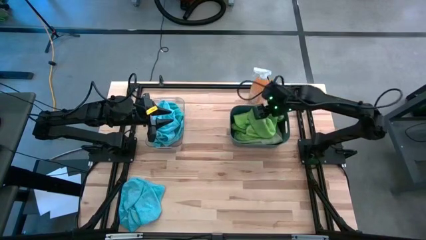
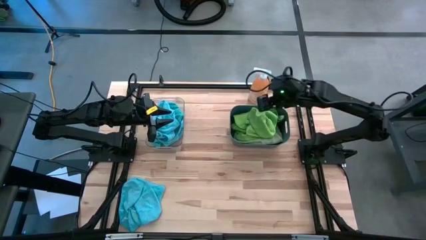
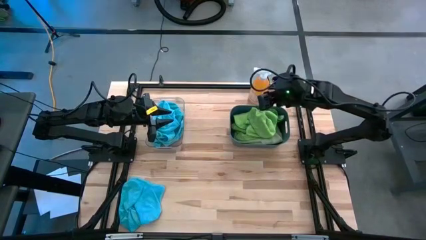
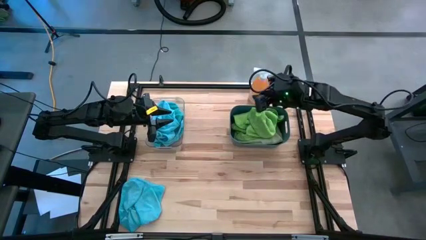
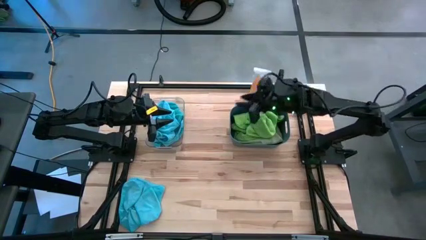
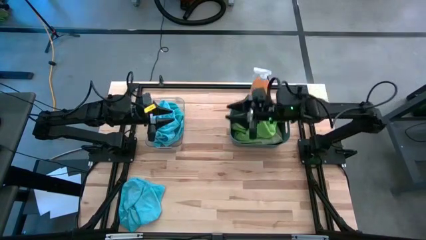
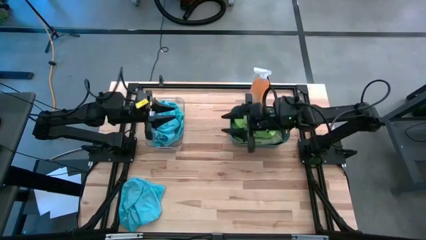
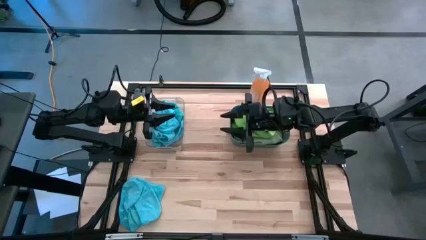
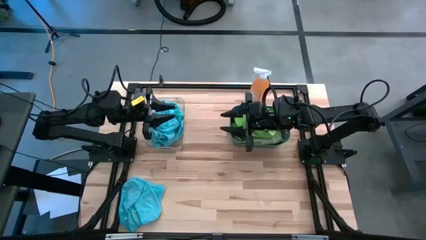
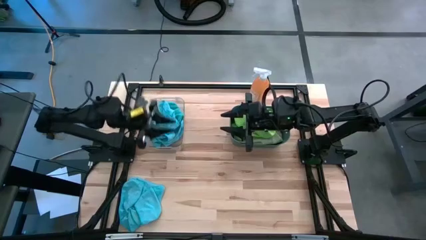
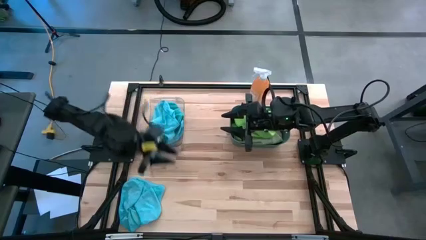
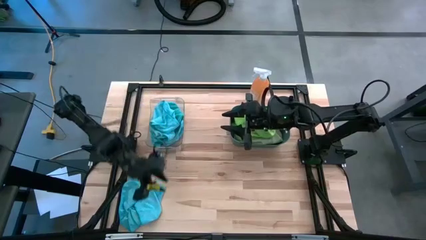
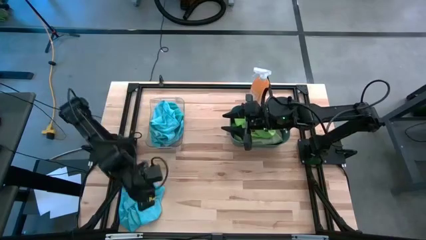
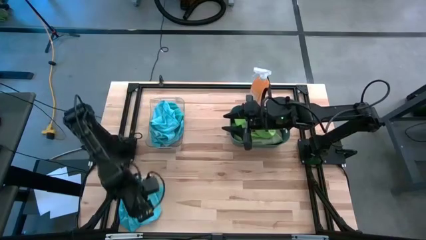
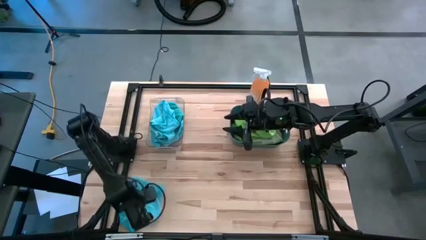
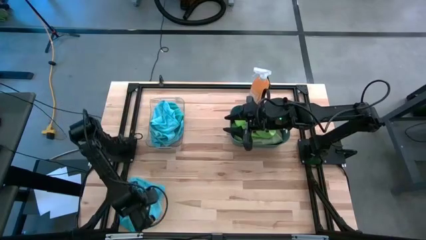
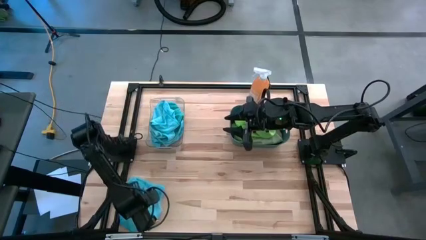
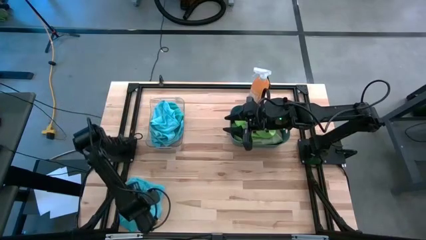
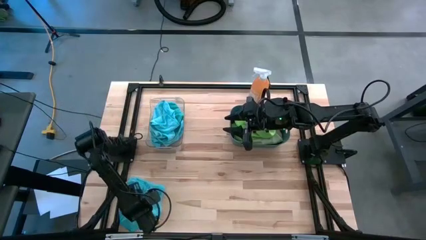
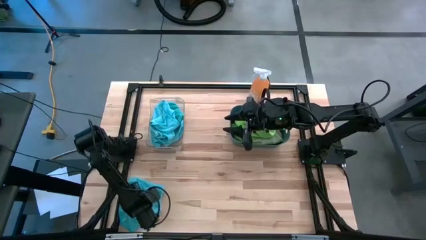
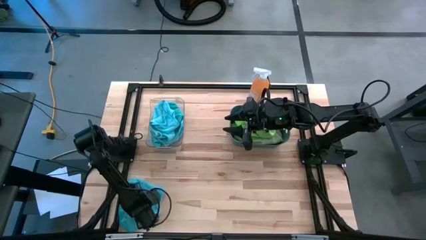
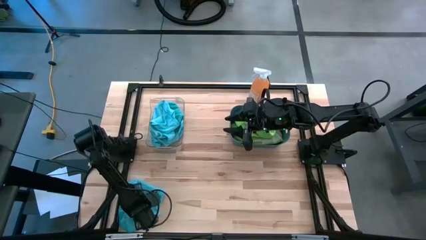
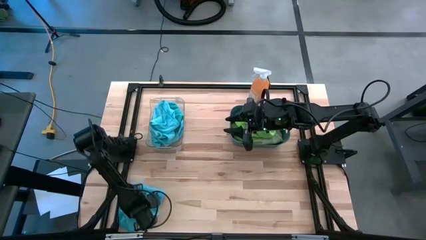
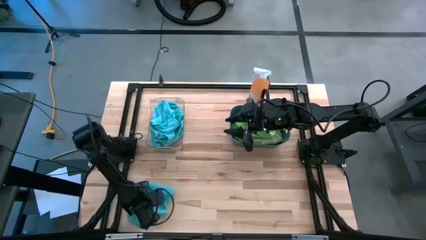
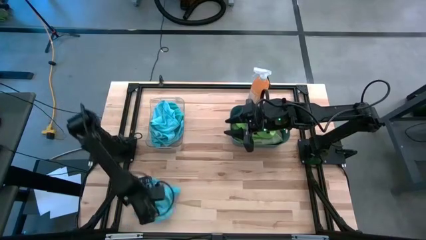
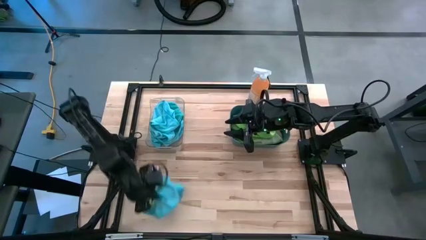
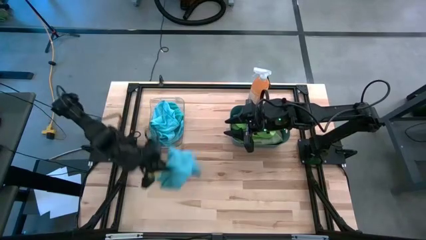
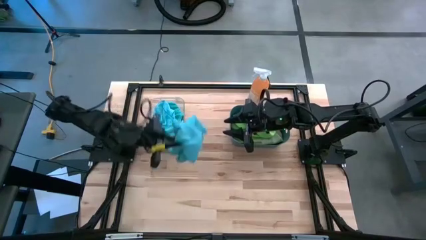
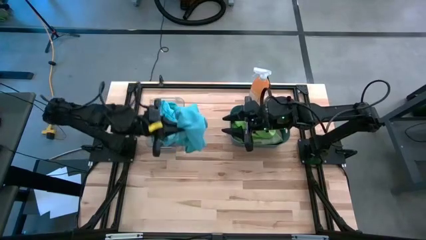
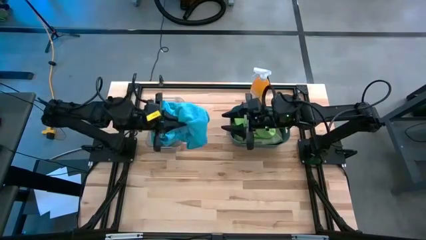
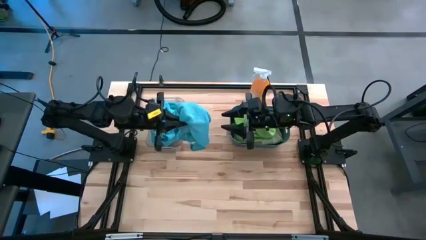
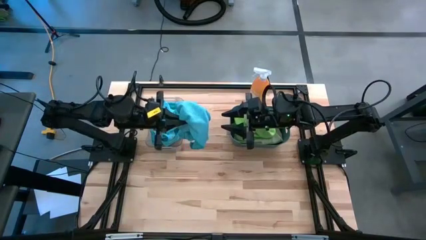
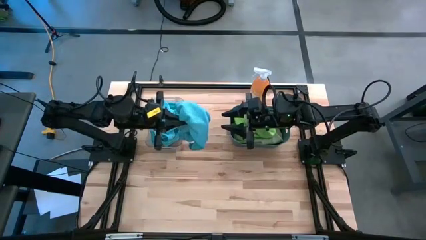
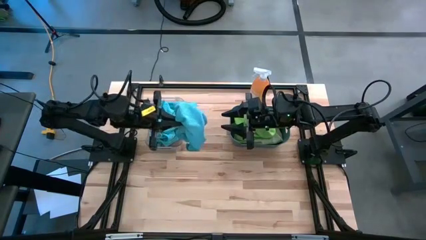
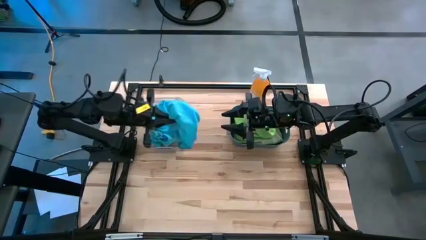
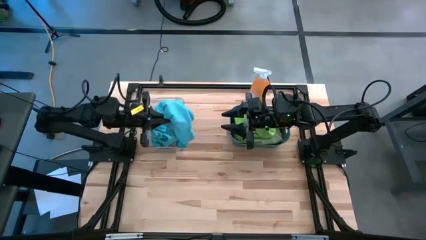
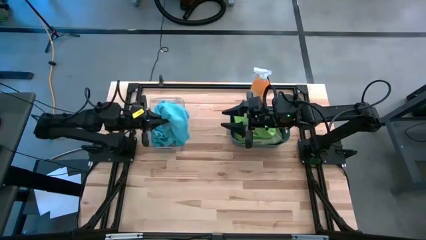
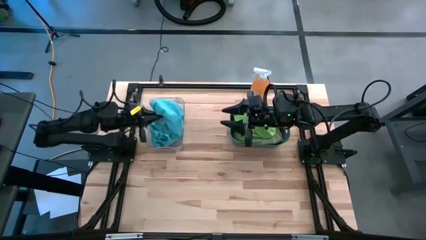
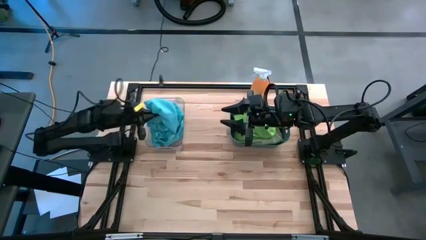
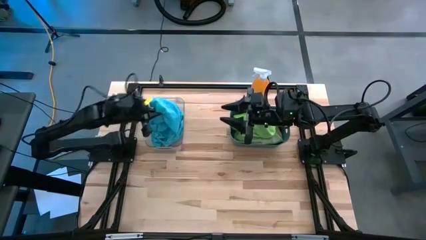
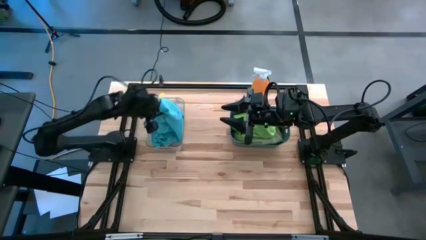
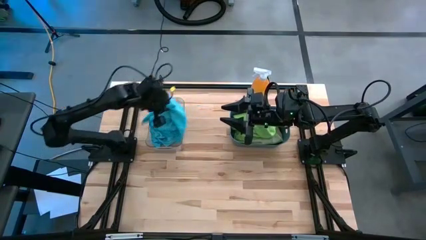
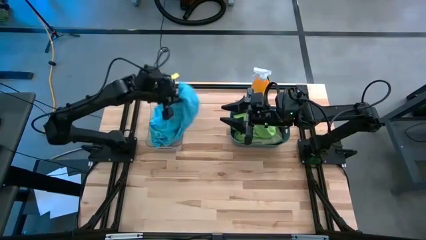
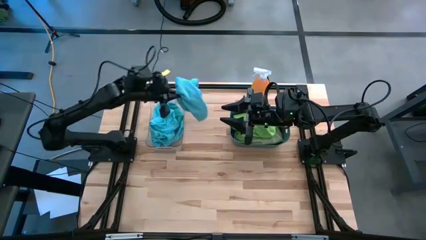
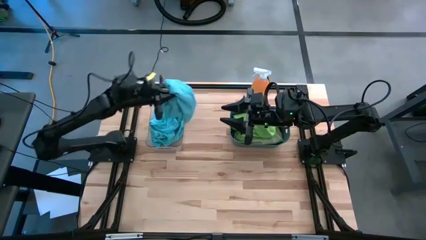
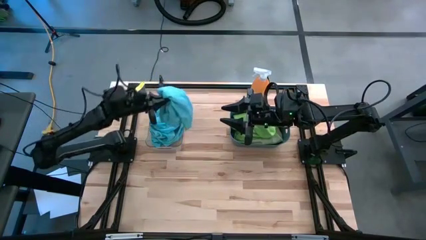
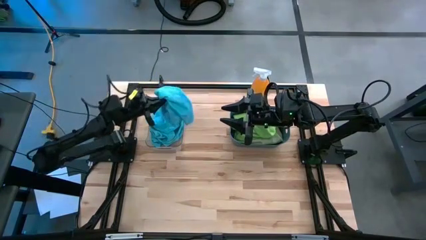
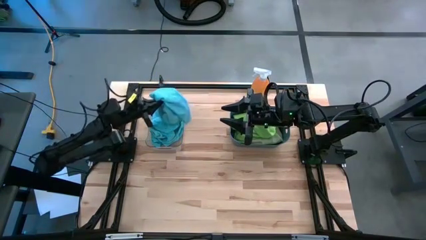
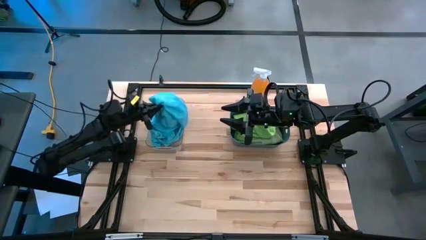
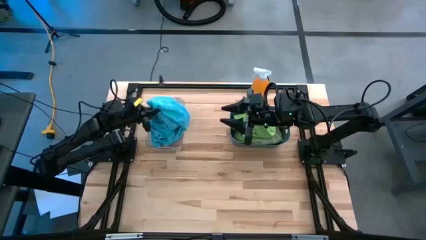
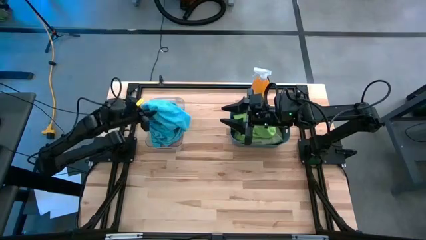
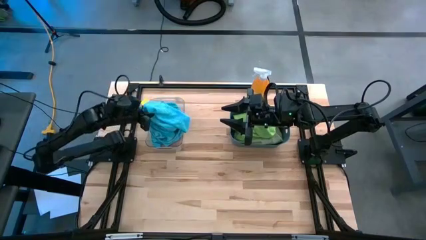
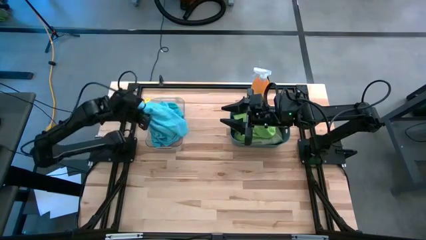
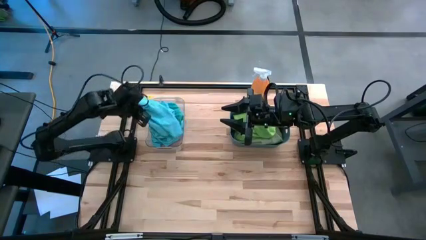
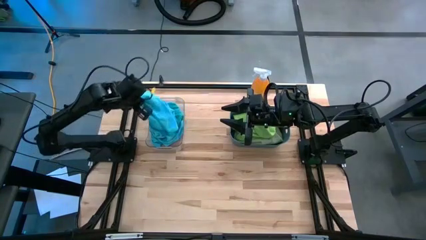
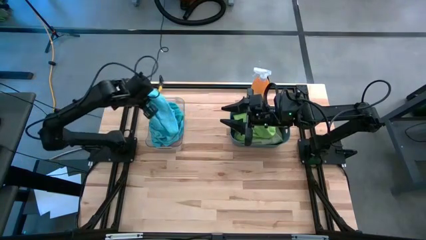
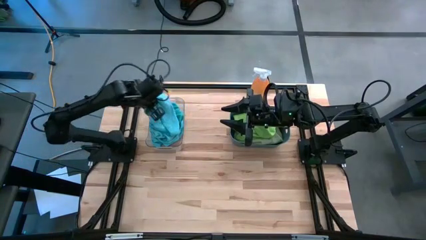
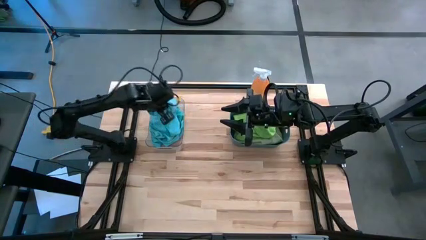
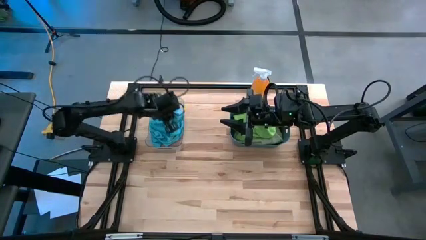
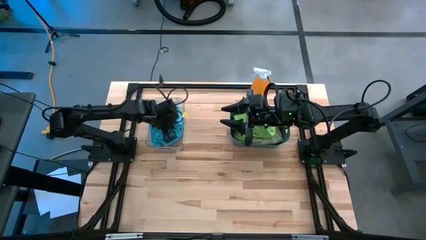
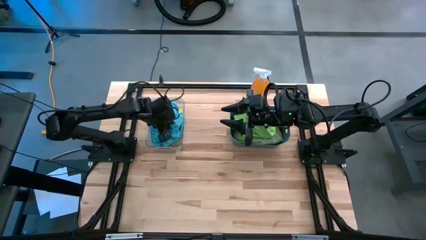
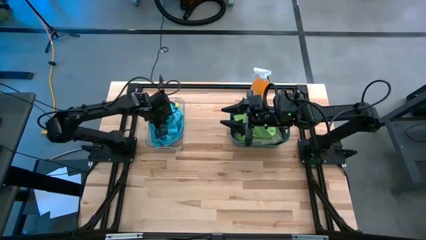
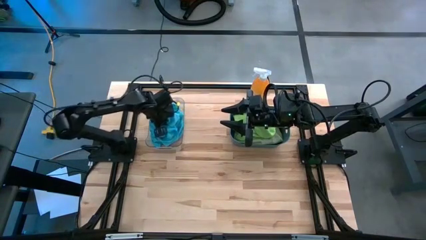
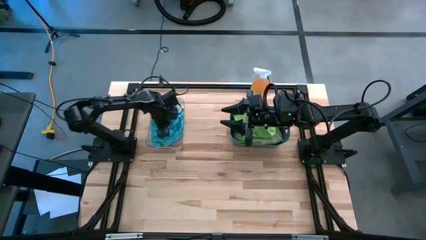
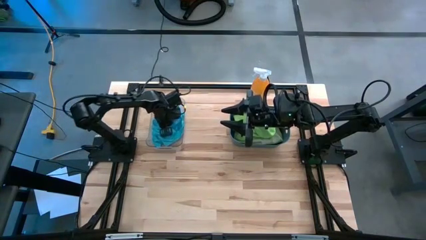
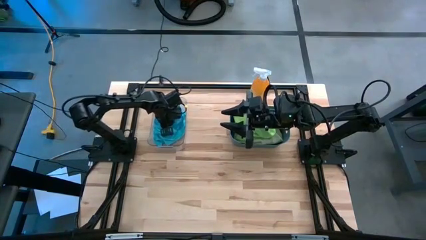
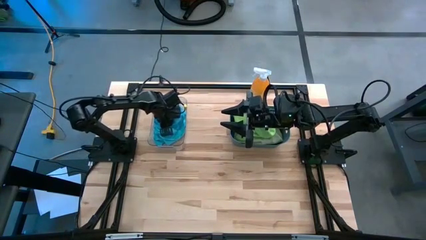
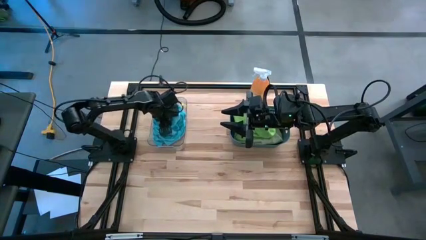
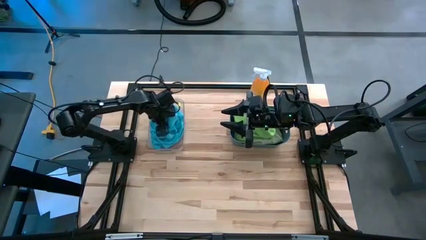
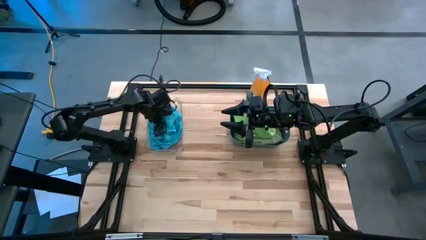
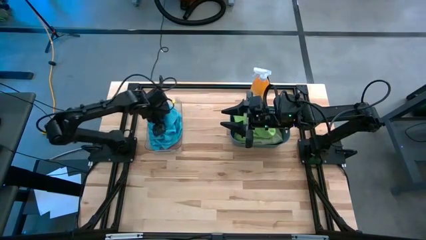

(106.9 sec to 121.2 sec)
Task: Sort microfiber towel by color & place in baskets
Put the blue microfiber towel into the transparent bin

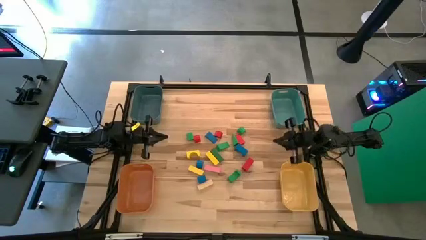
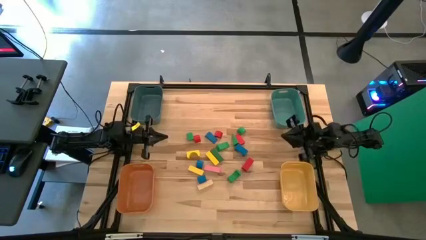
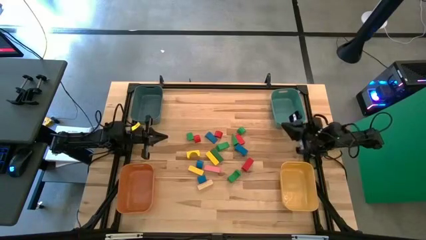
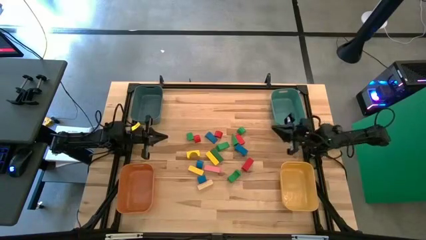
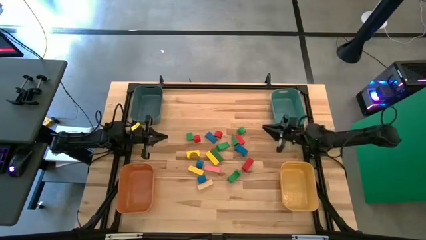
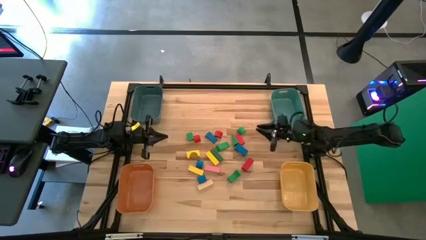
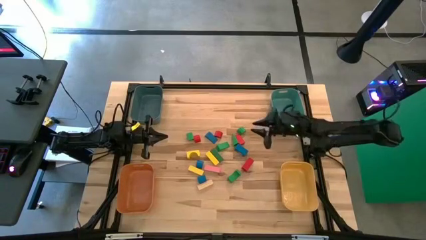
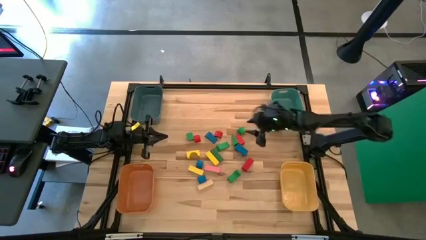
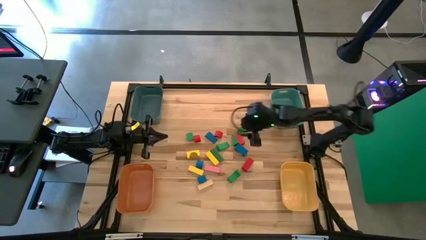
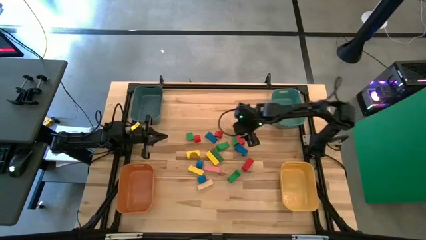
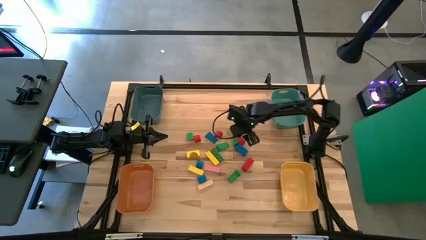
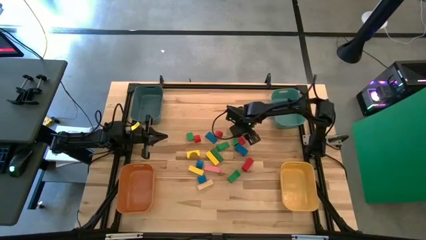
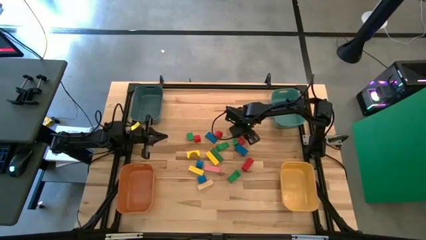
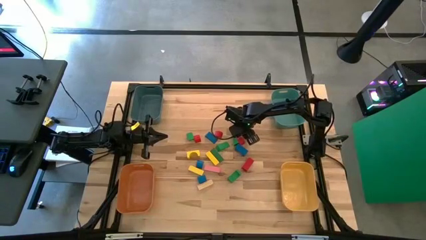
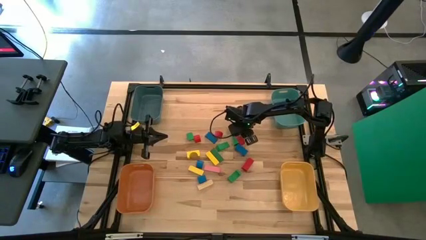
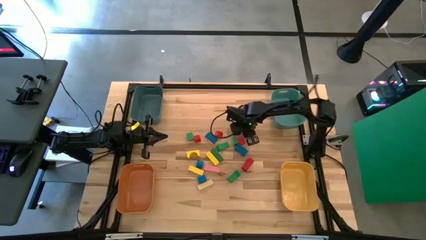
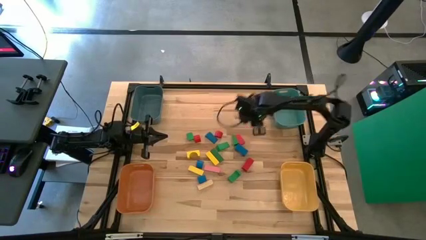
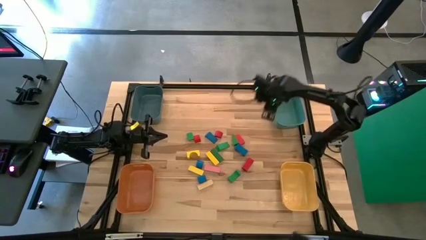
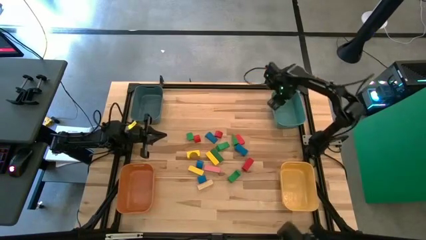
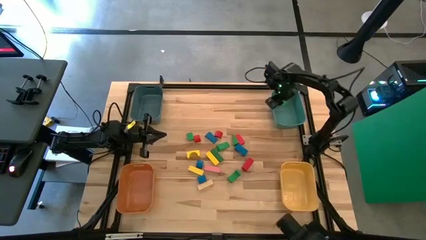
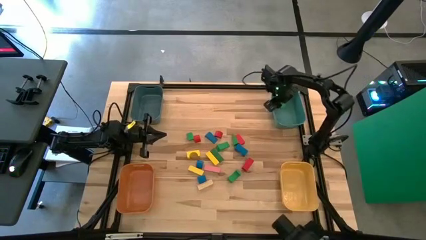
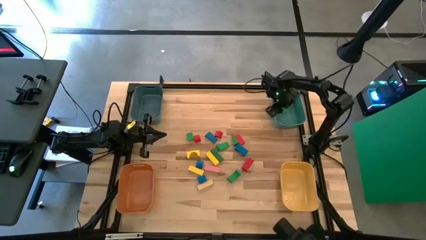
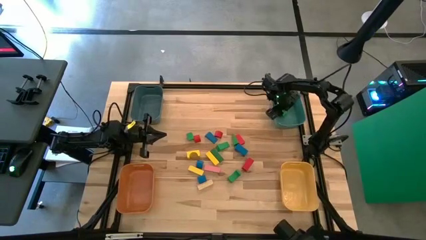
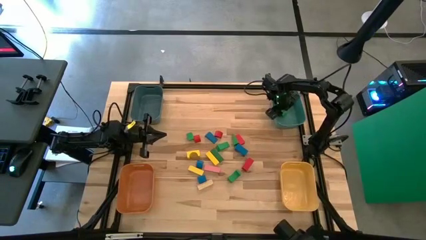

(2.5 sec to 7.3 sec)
Task: Sort blocks by size
Put the green semicircle block into the green bin
